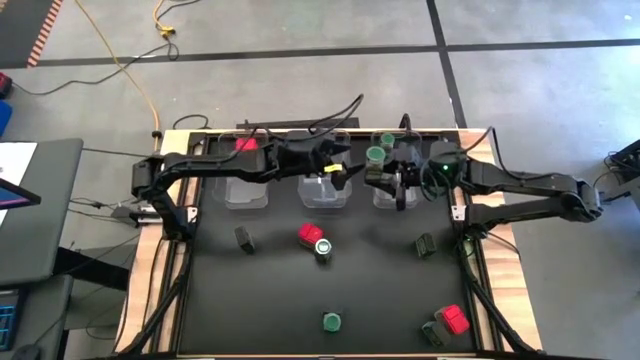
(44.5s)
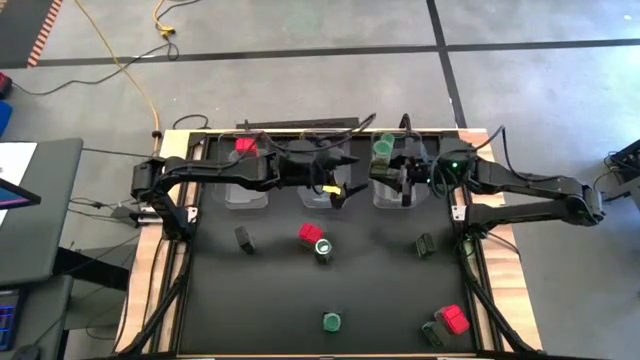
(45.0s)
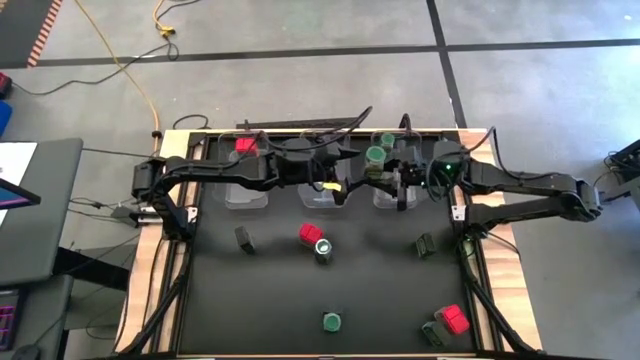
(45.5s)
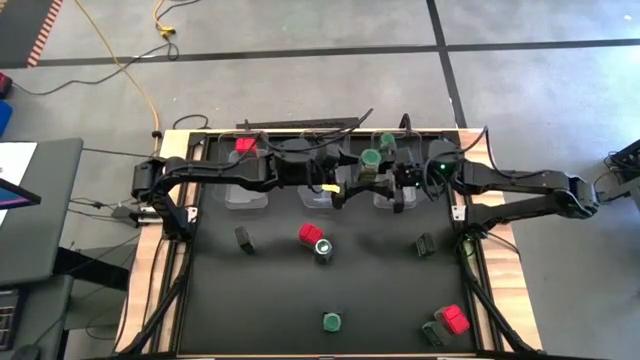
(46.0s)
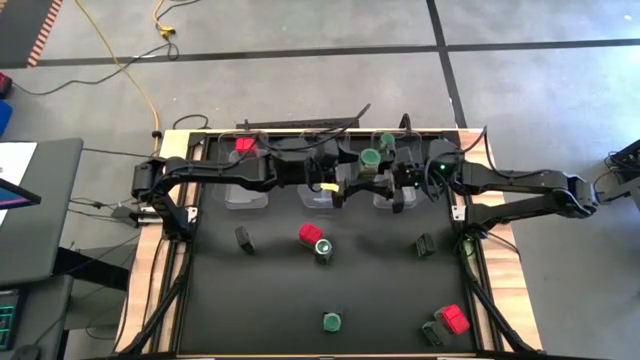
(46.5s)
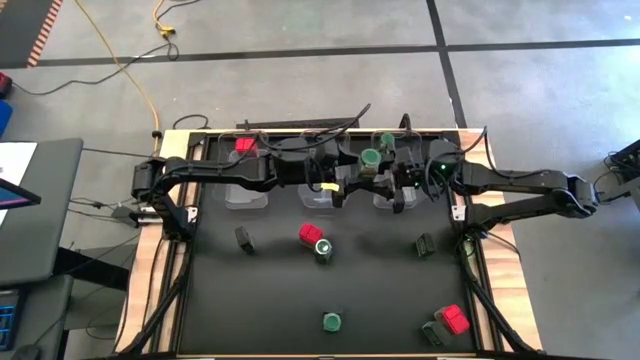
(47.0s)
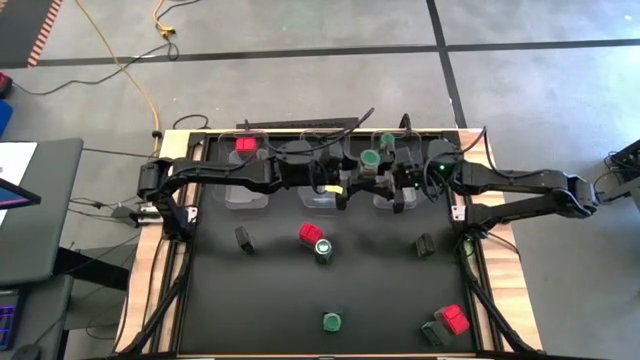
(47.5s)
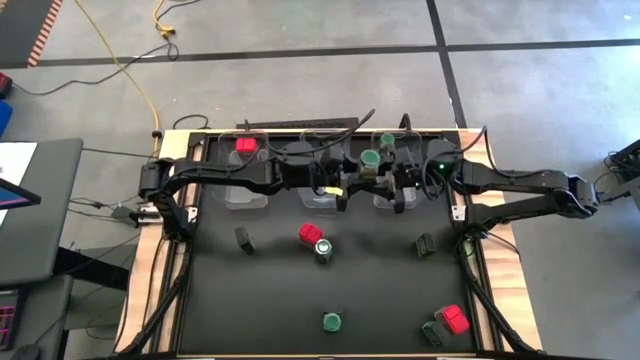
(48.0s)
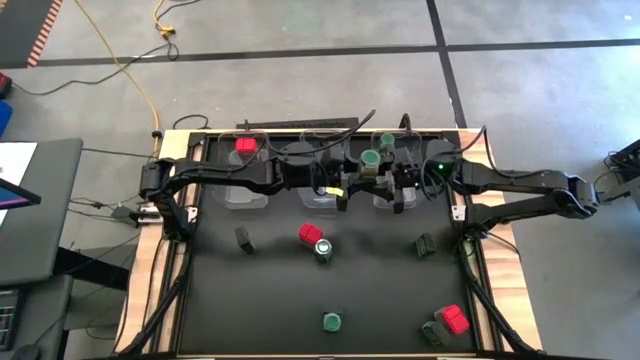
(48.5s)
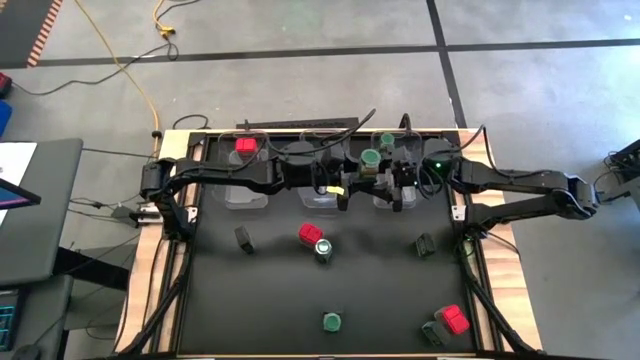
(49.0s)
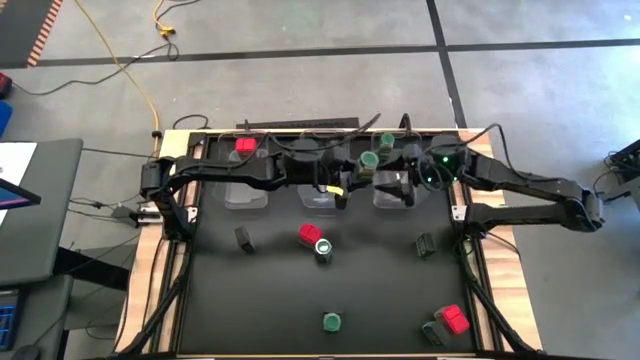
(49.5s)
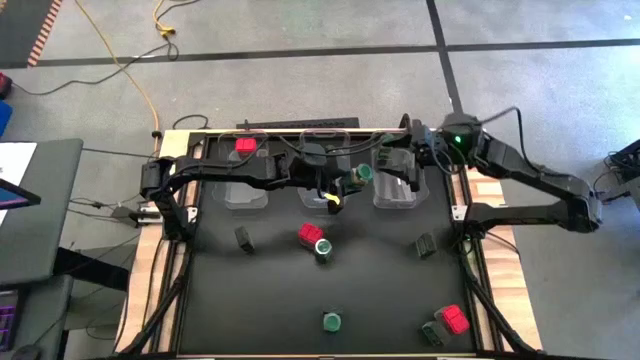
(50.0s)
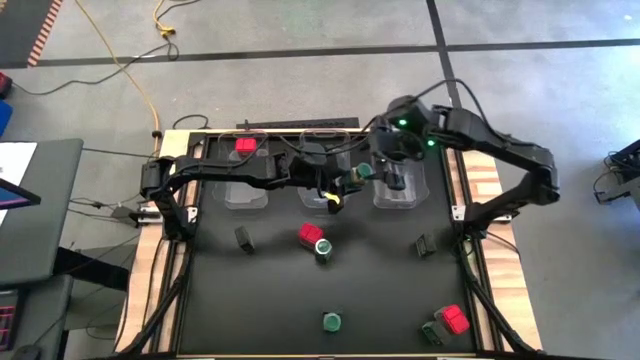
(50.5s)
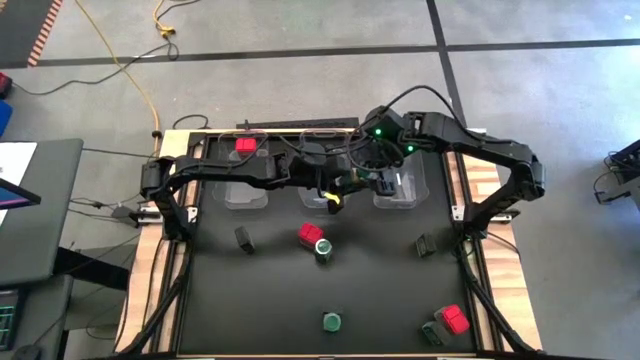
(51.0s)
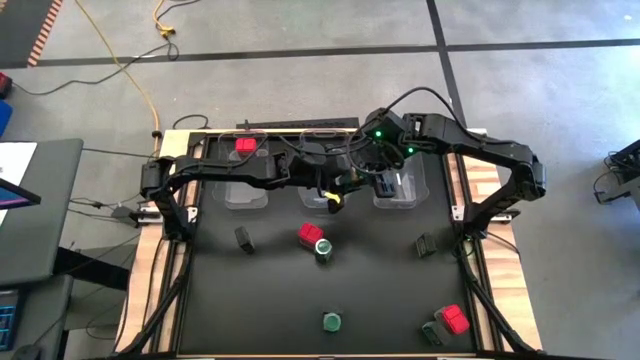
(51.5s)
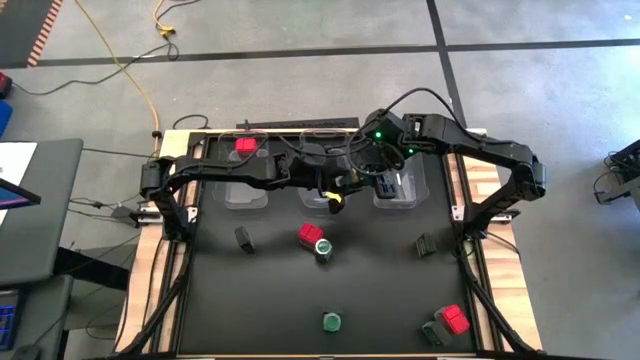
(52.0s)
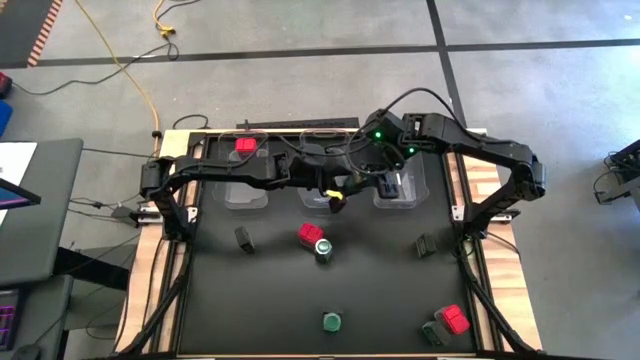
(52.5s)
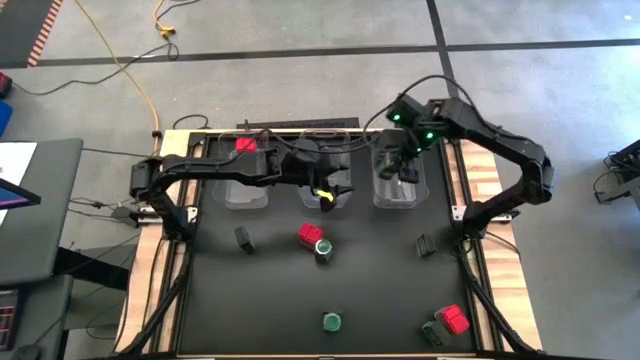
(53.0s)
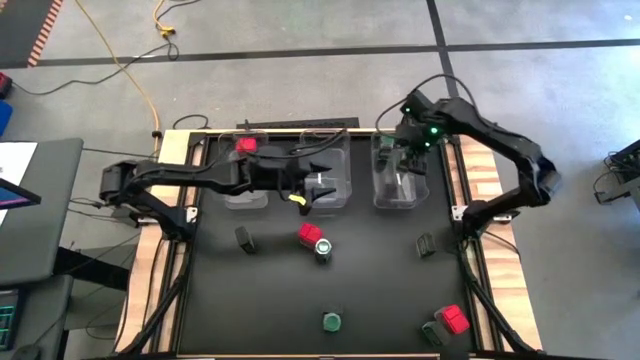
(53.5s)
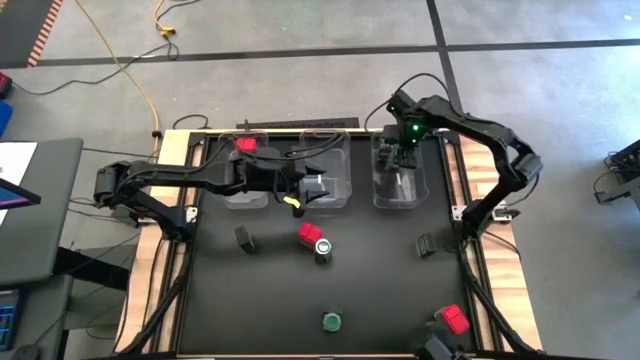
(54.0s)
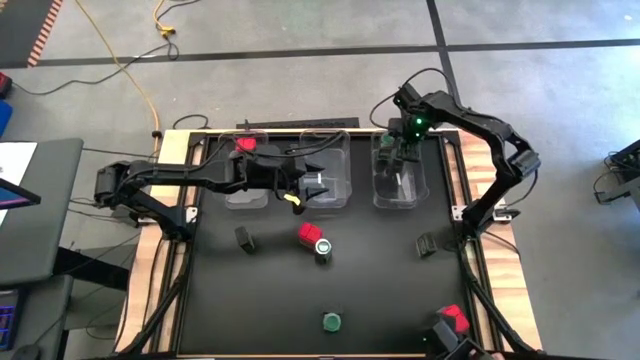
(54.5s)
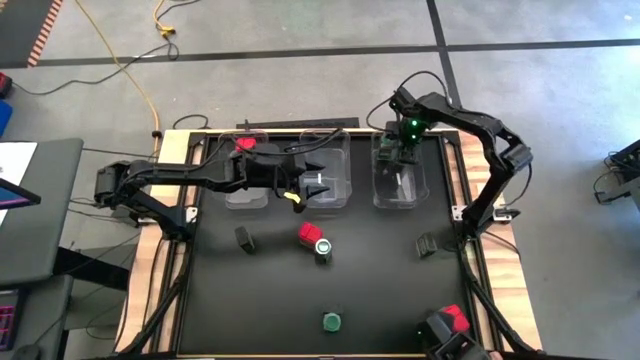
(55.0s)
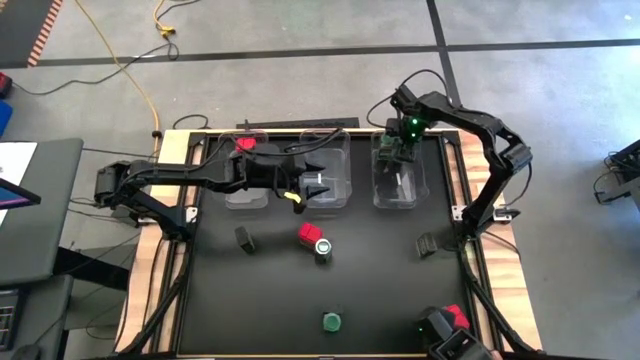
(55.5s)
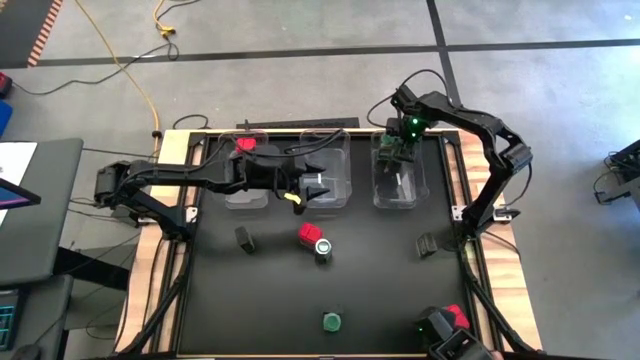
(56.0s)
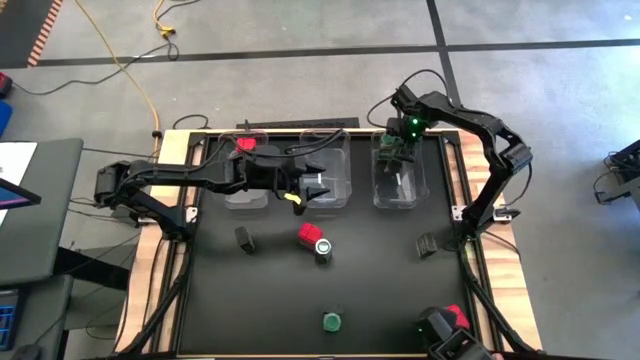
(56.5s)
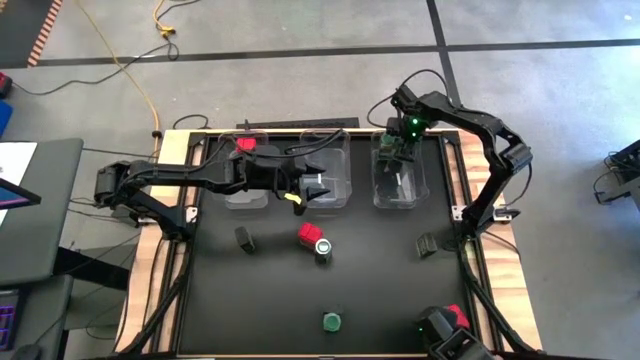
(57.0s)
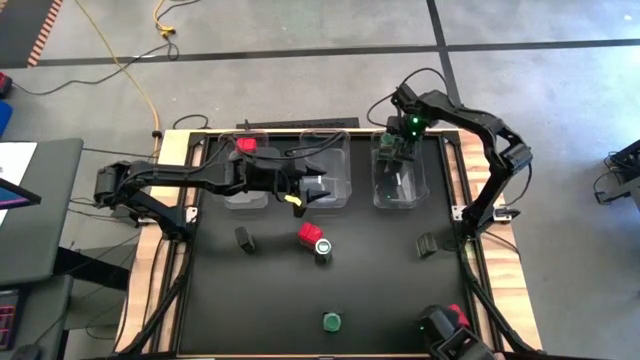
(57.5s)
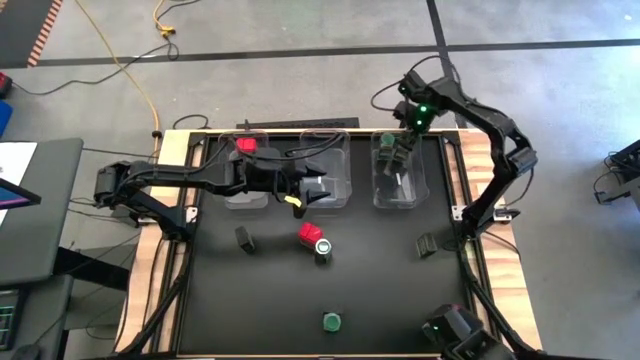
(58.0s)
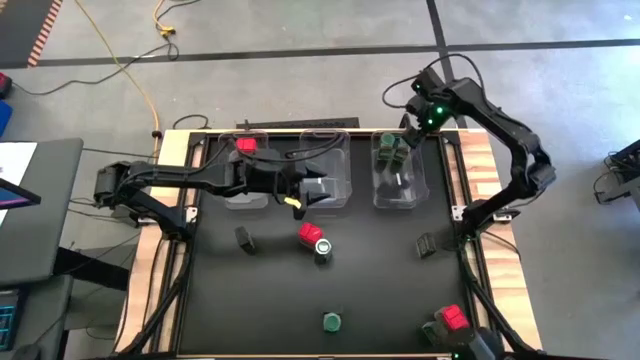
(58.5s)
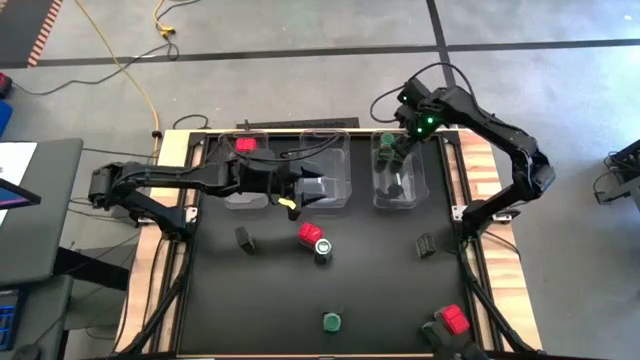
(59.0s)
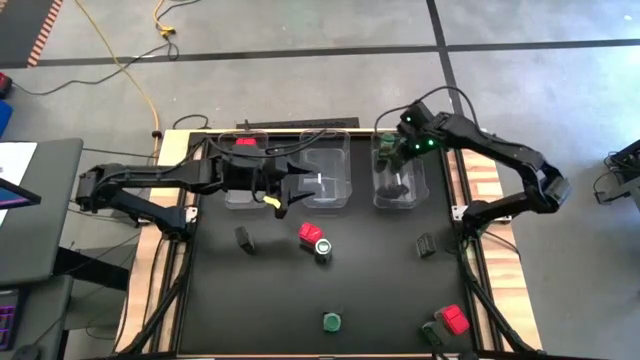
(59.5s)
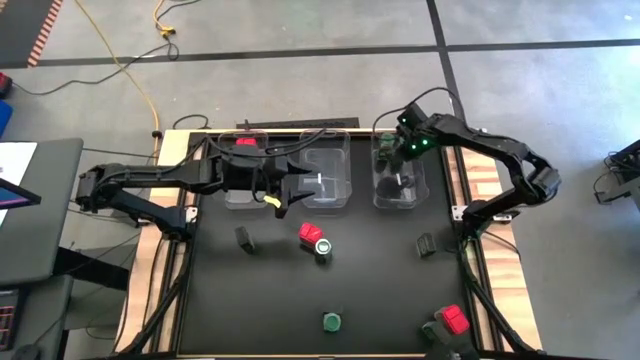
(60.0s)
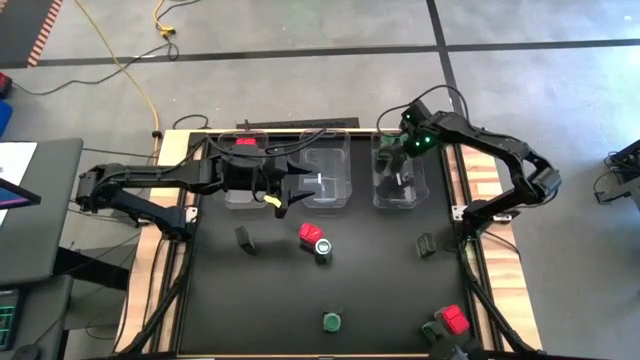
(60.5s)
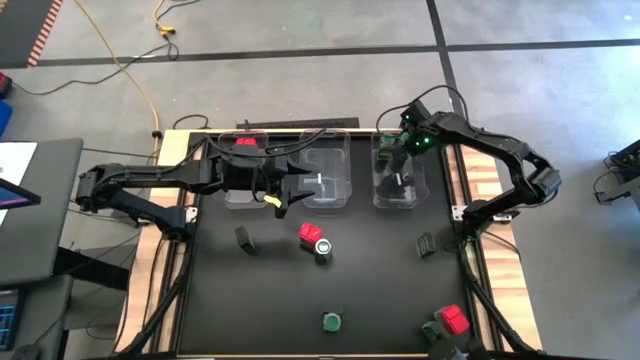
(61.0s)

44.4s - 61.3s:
Task: Sort spices by type
Put the green seasoning bottle into the right transparent bin

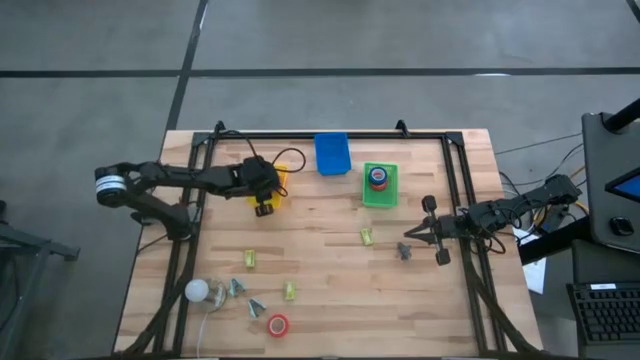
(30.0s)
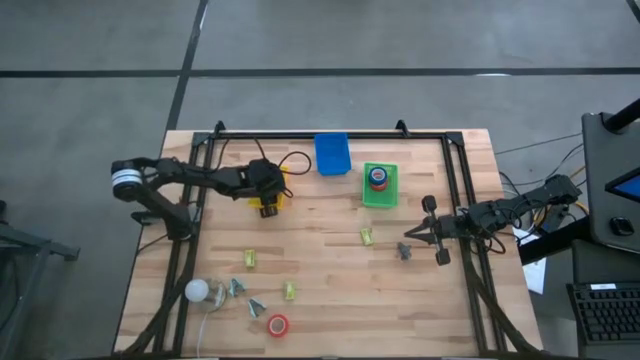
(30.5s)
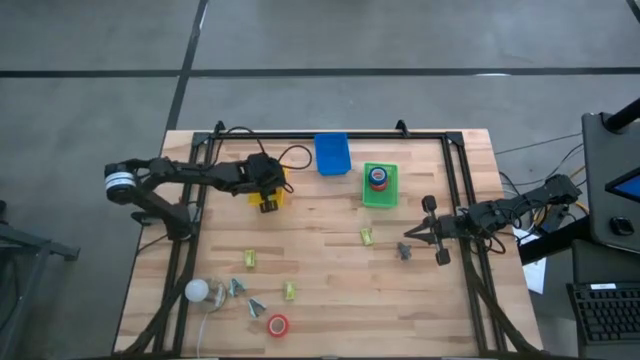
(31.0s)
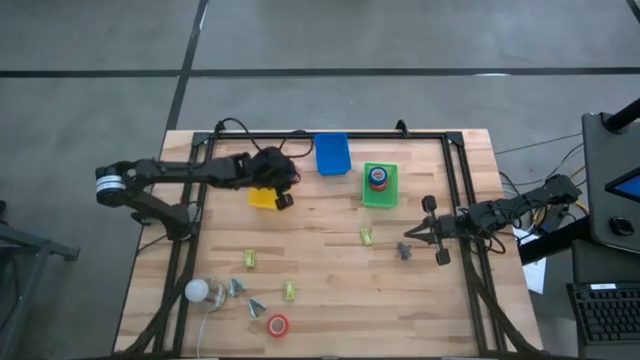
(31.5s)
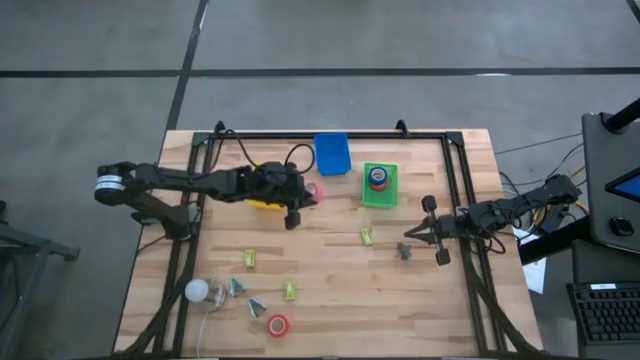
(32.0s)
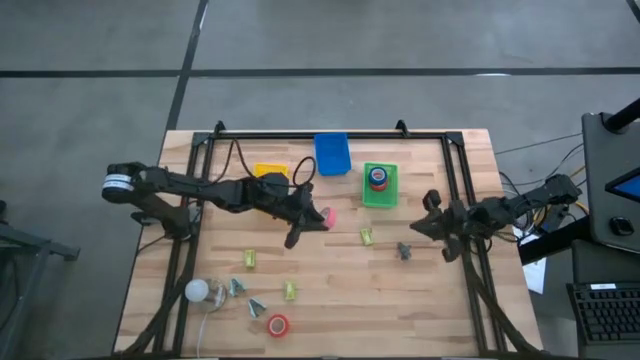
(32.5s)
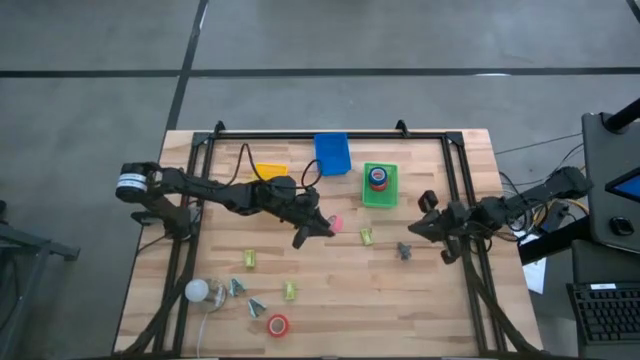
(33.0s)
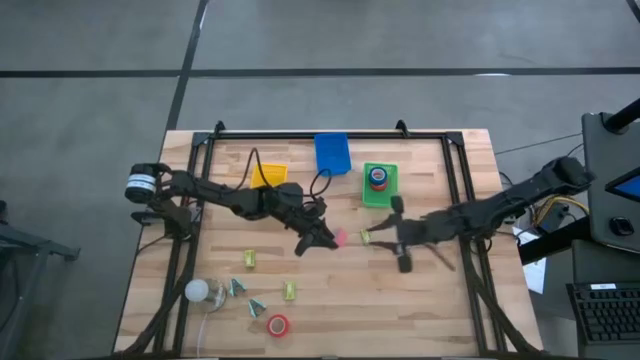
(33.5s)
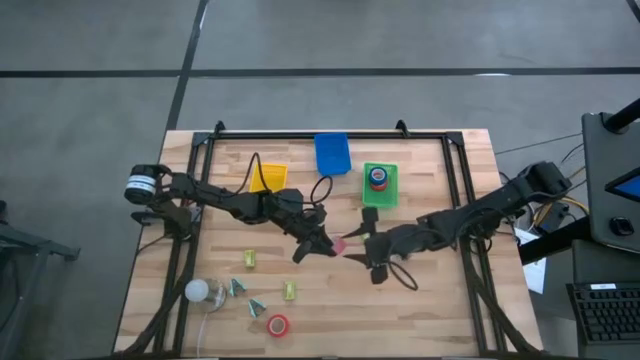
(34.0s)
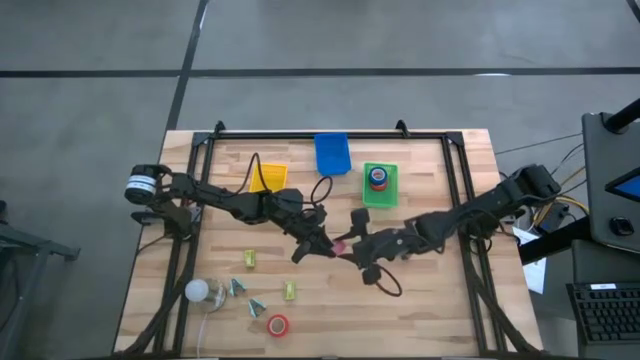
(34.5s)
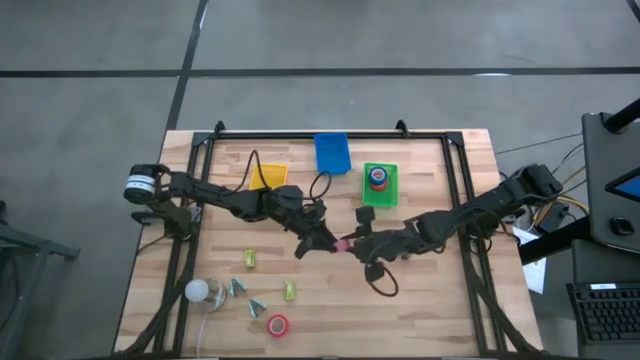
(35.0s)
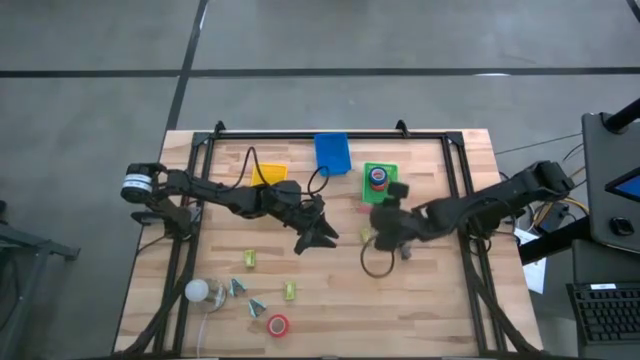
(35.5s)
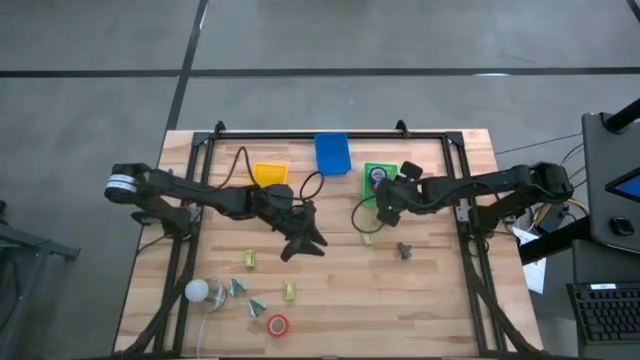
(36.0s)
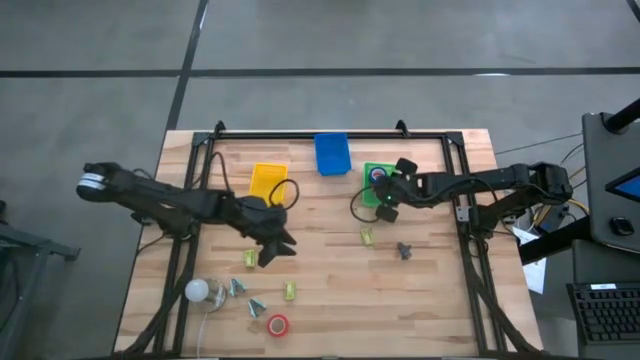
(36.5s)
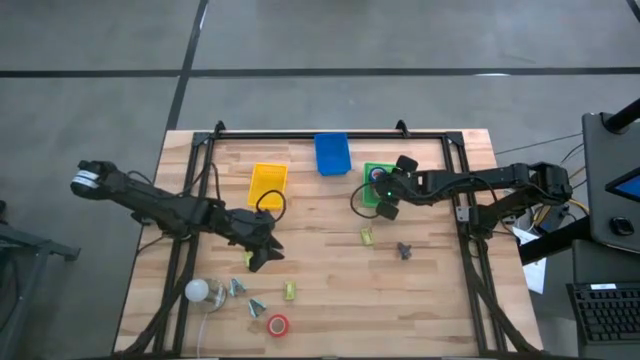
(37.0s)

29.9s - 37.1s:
Task: Pick and place Stapler, Stapler remover, tape
Put the pink tape into the green basket
